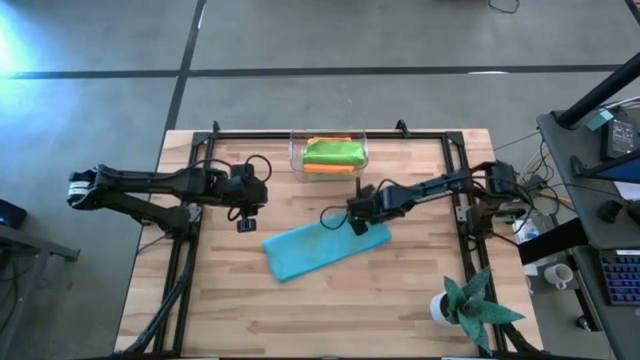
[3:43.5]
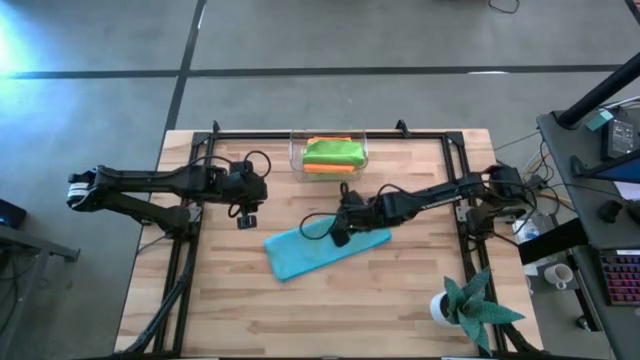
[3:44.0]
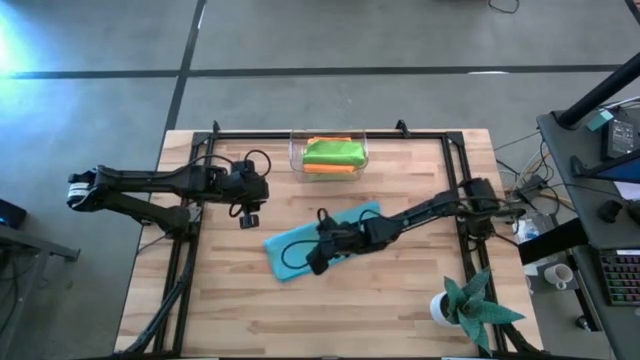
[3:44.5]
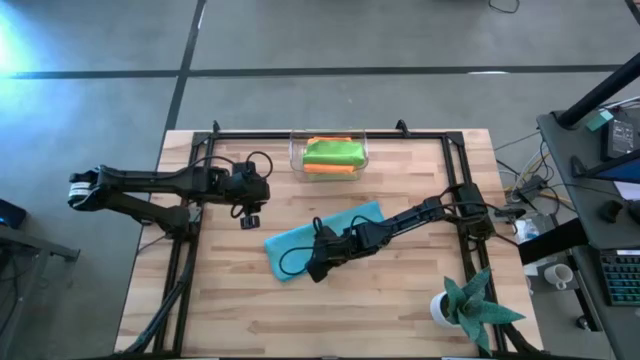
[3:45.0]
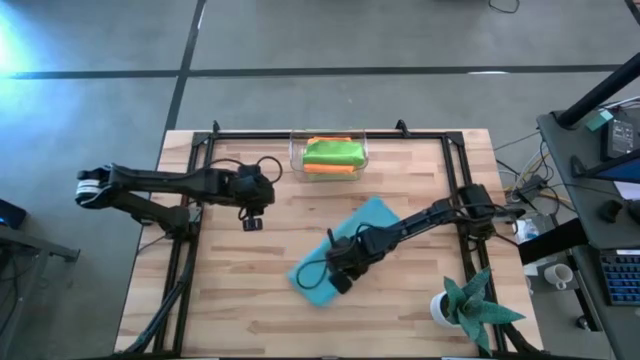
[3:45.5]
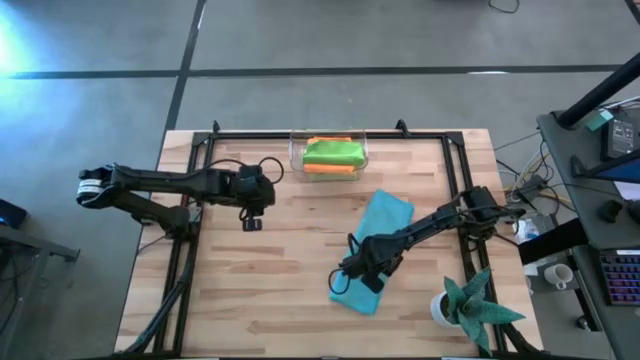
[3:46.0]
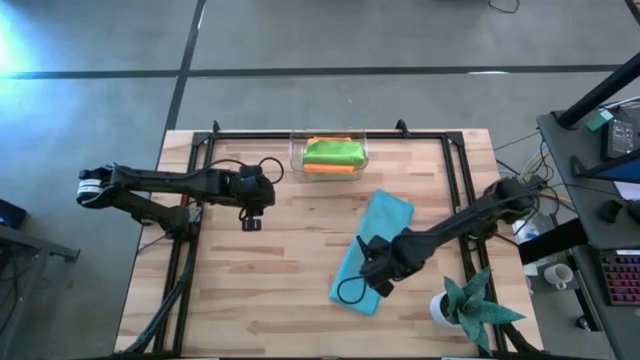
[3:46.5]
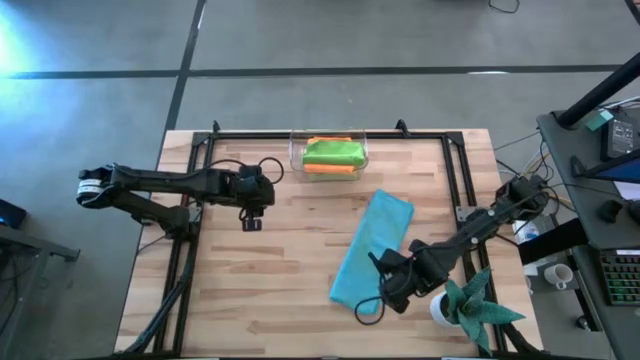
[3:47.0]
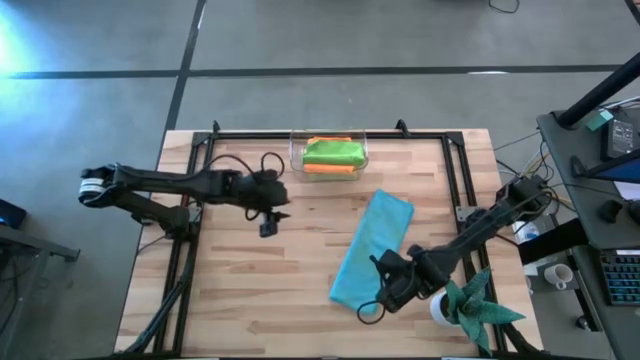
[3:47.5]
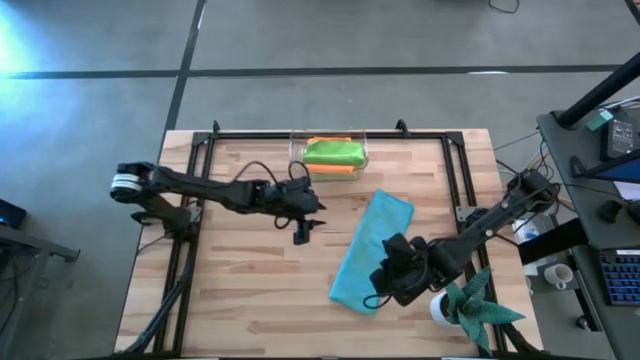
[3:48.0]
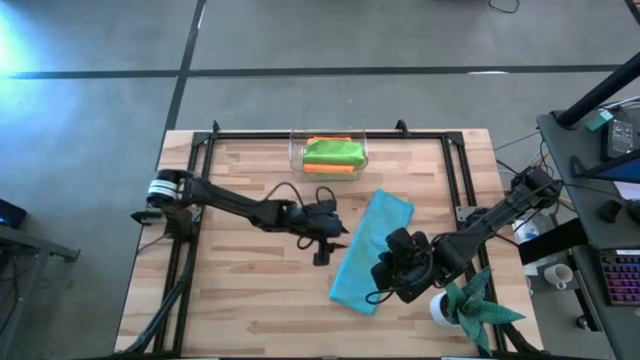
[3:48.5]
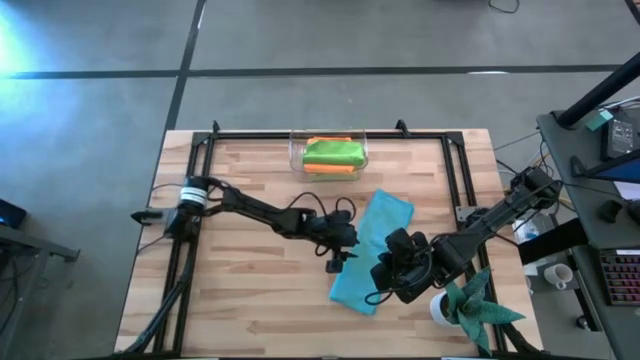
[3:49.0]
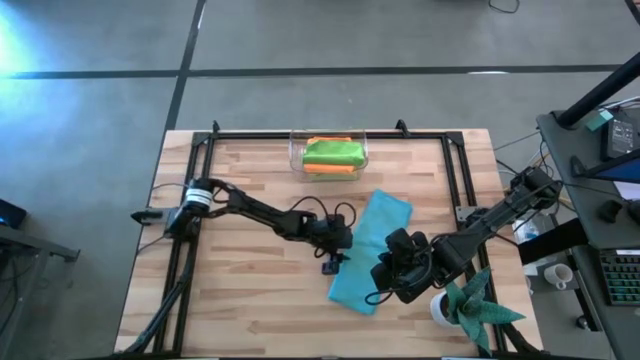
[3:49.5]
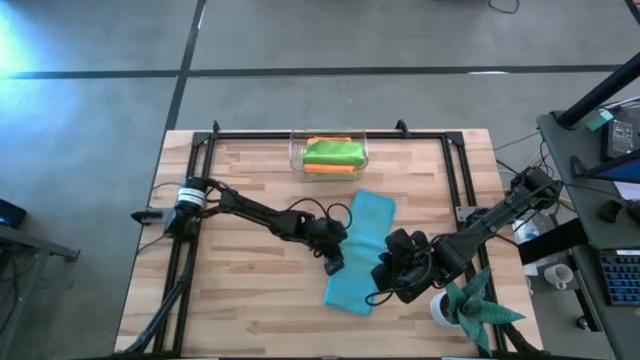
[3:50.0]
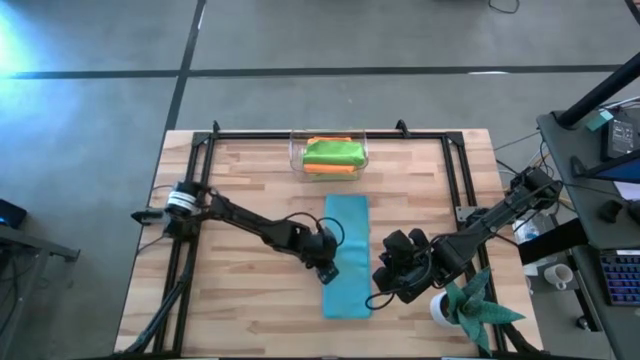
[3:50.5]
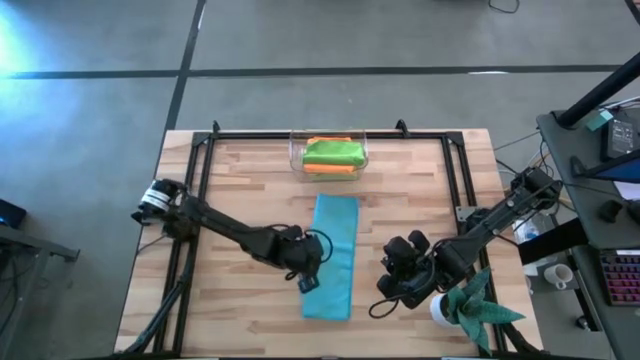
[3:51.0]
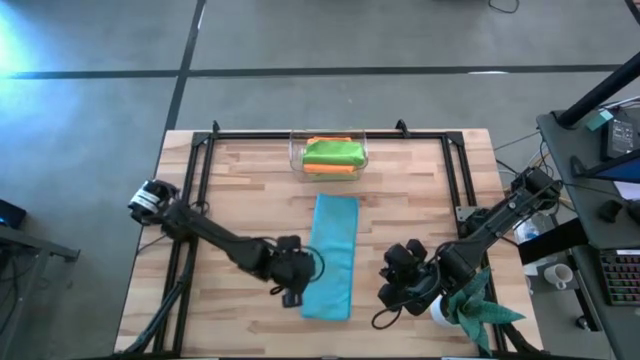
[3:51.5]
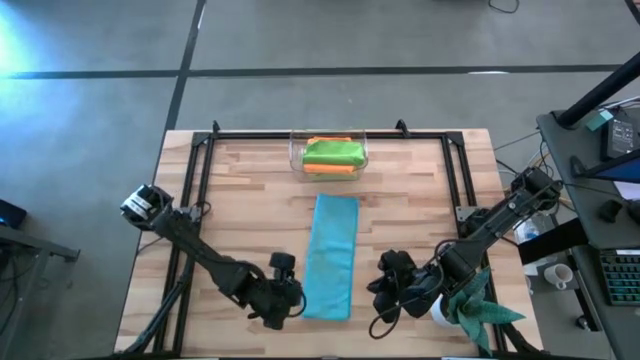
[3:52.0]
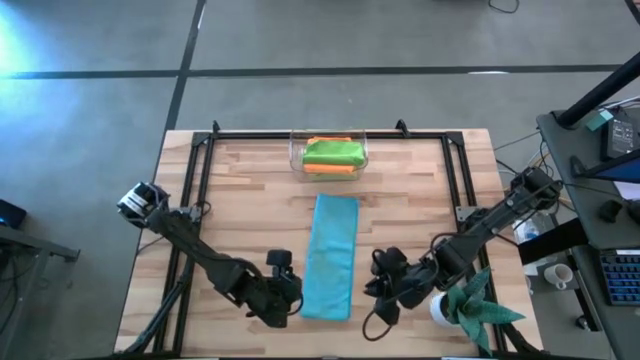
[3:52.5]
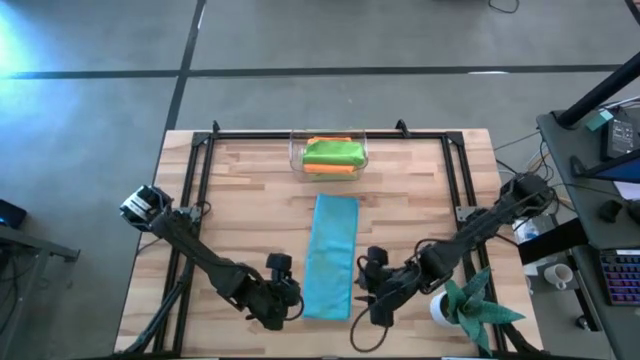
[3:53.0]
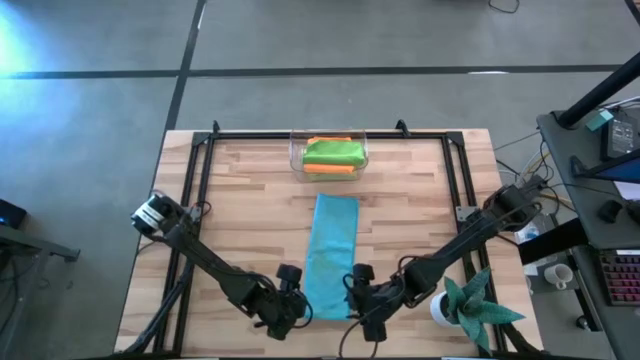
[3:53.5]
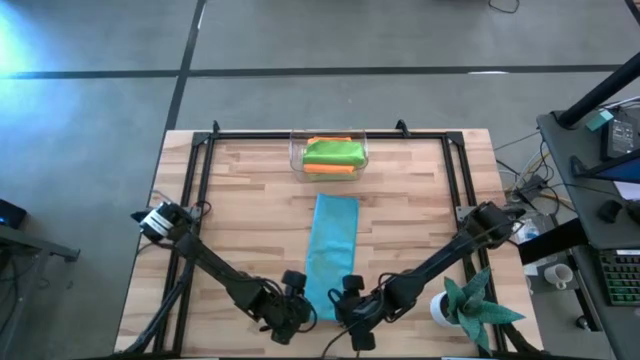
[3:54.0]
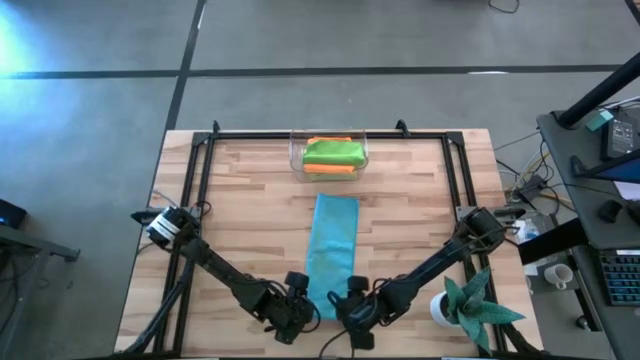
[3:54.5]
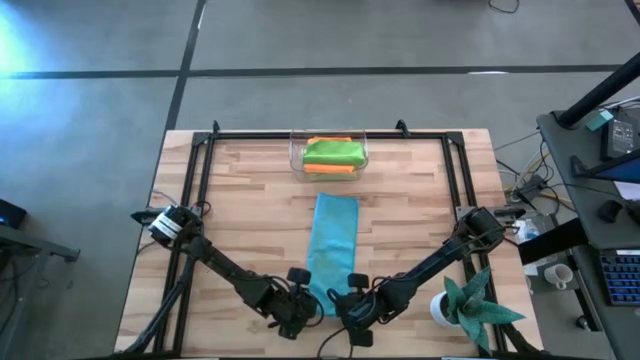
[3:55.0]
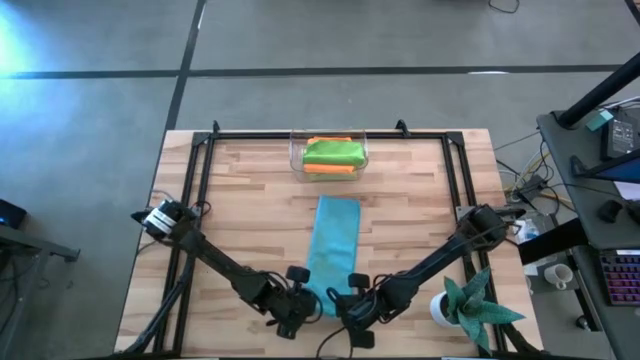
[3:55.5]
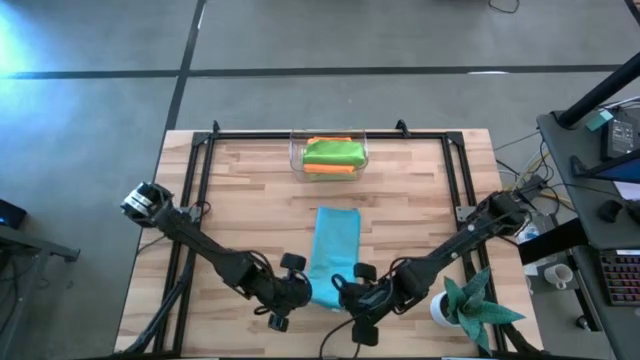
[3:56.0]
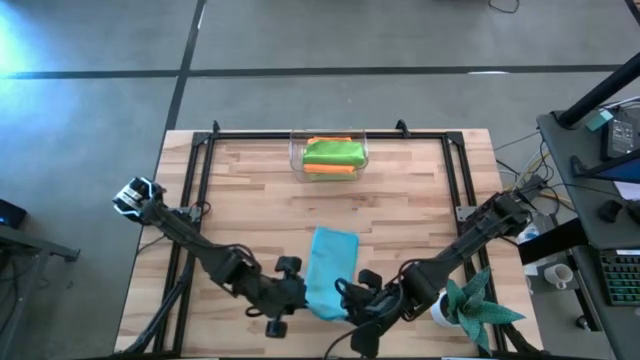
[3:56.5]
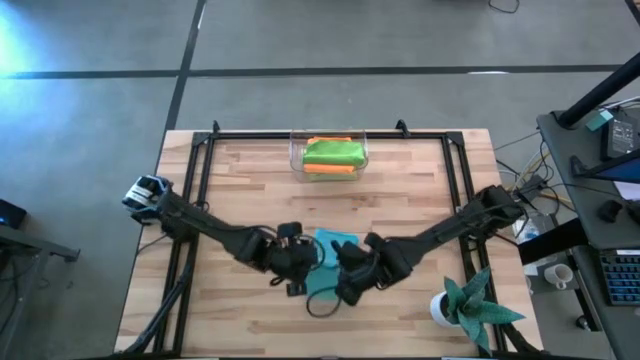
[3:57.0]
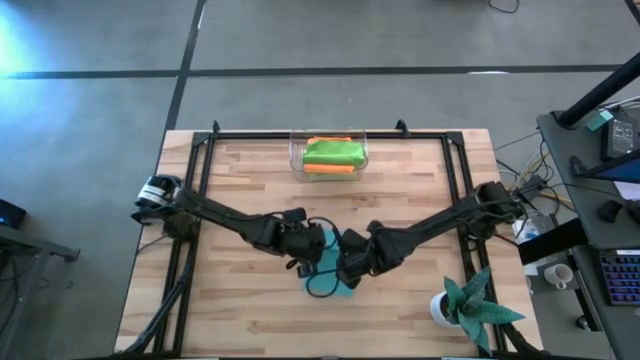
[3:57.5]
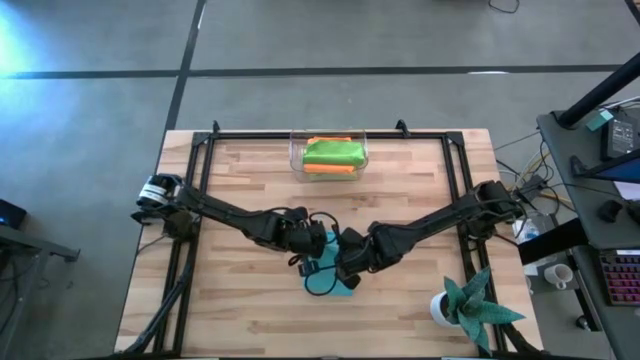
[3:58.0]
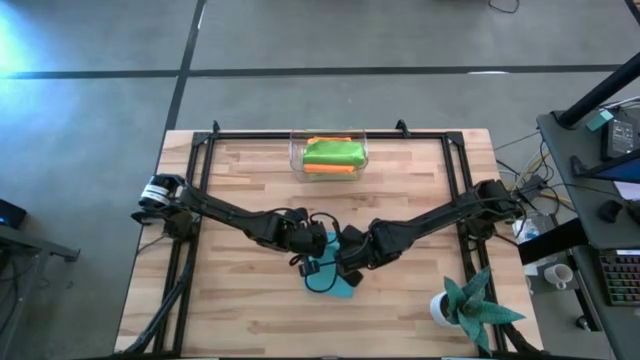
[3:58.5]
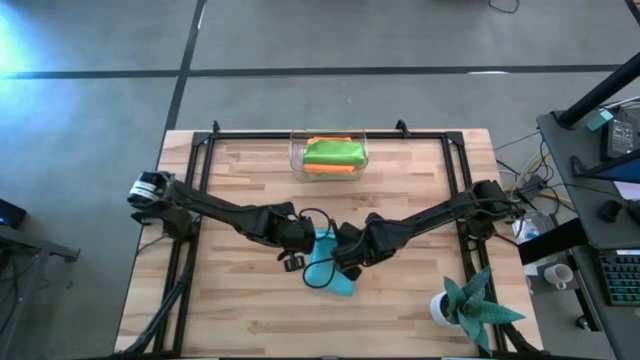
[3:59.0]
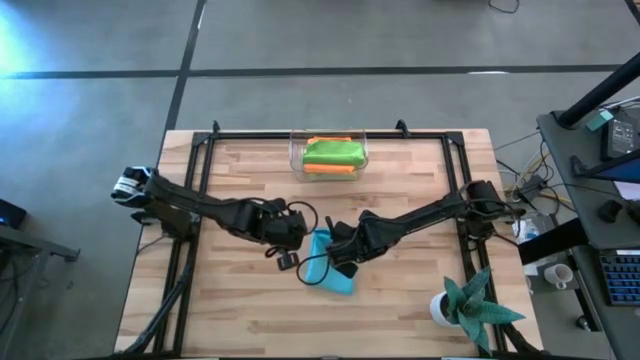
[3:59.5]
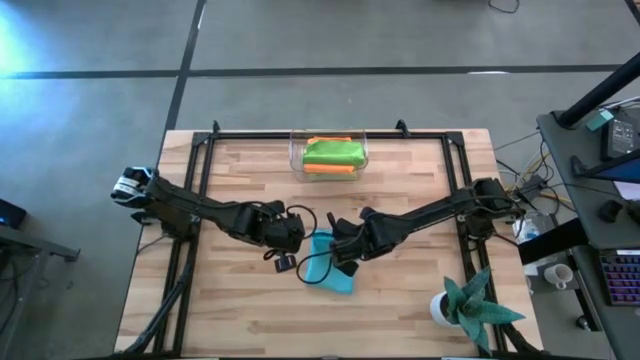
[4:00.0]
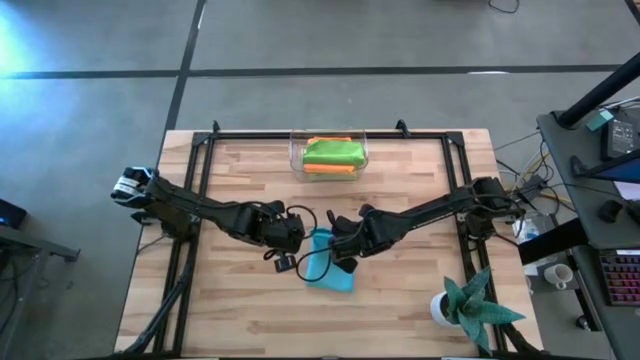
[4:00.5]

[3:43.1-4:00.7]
Task: Fold microfiber towels
Fold the blue microfiber towel

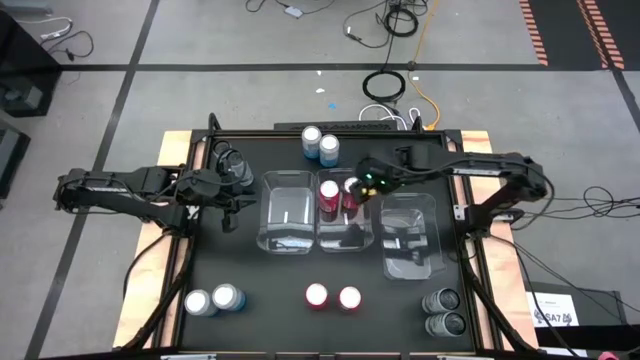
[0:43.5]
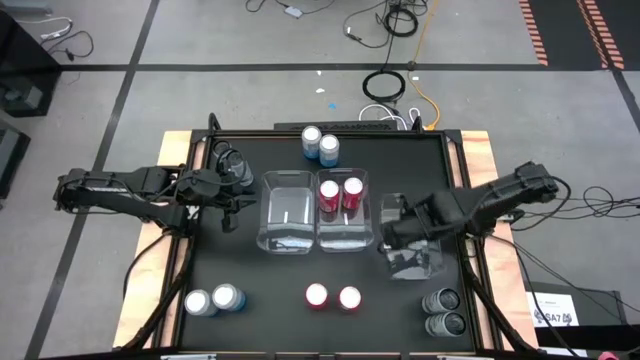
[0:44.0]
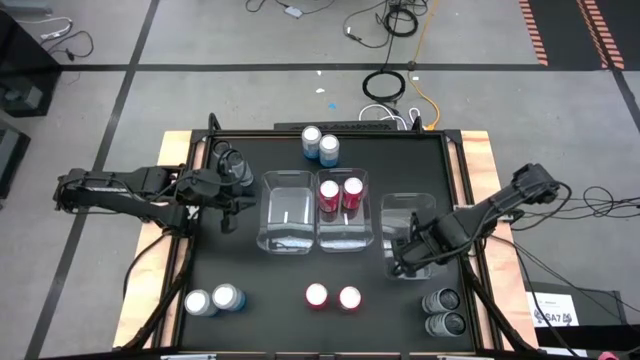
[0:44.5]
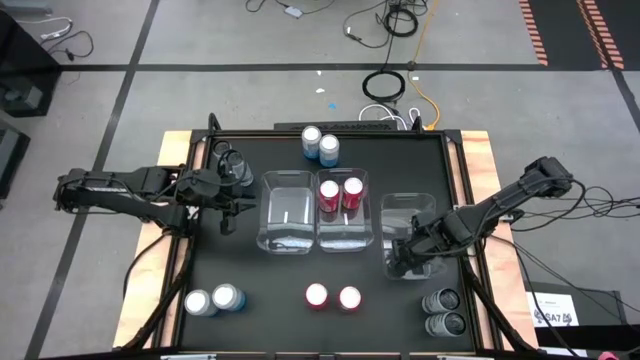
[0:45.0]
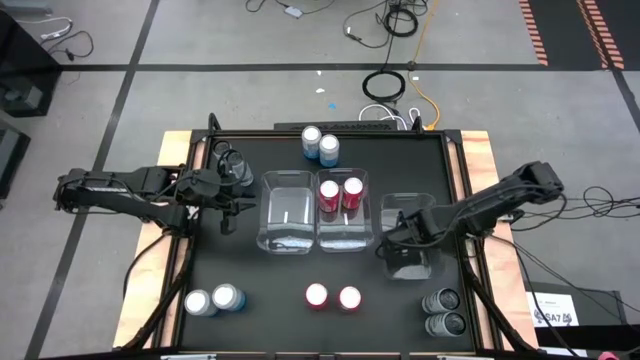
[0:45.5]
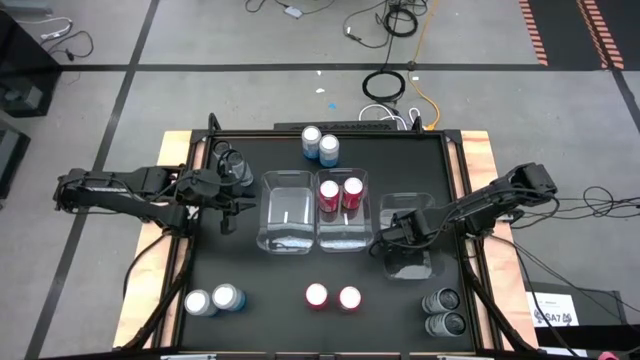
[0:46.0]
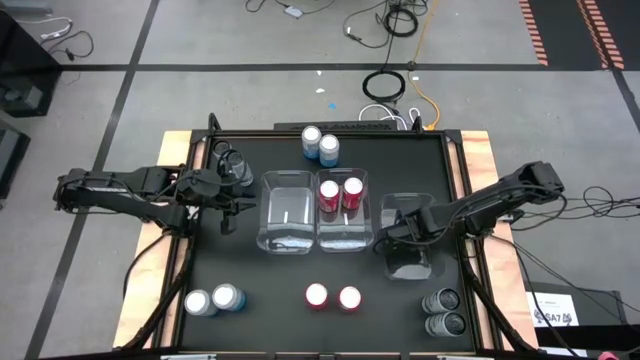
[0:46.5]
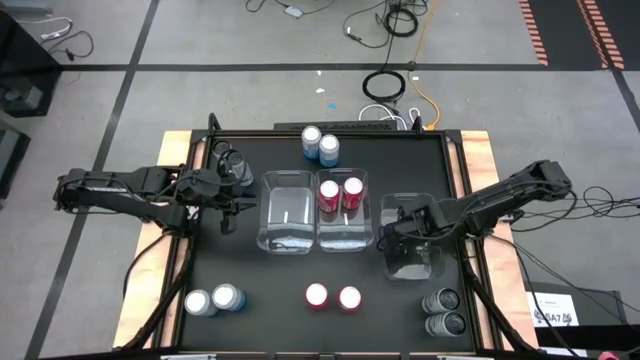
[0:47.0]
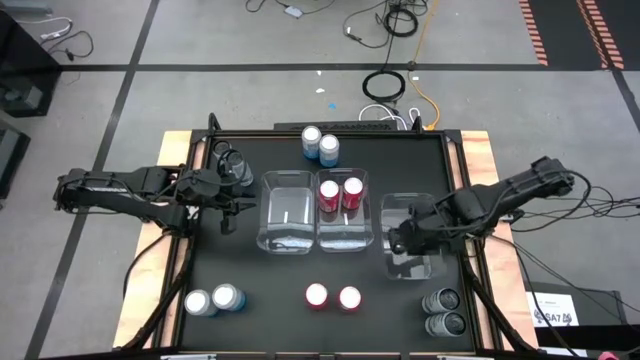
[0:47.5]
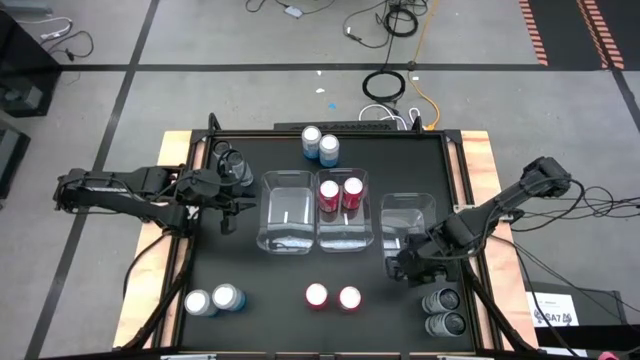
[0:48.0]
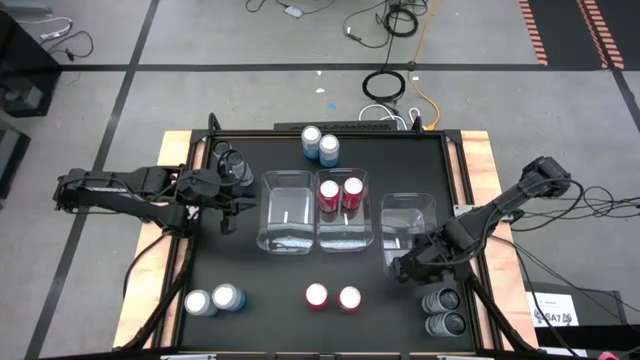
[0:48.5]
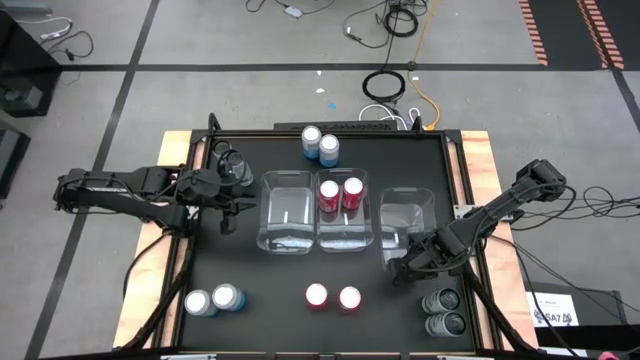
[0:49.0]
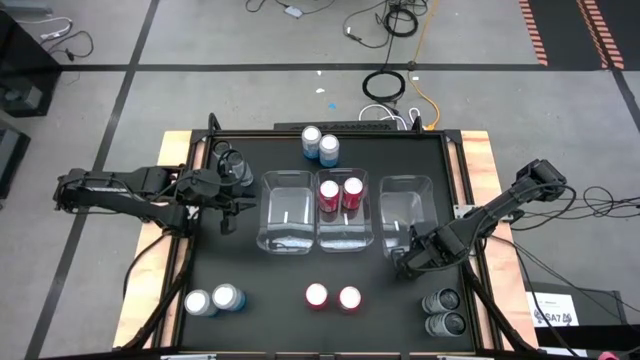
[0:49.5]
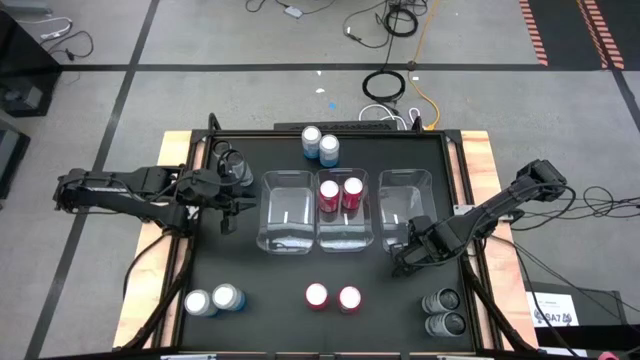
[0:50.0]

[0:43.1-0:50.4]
Task: Sort soda cans
Adjust the right transparent bin
